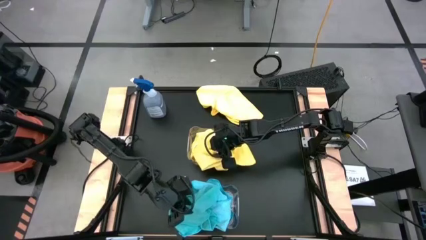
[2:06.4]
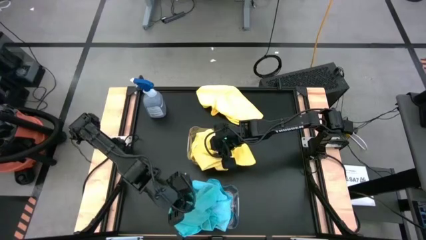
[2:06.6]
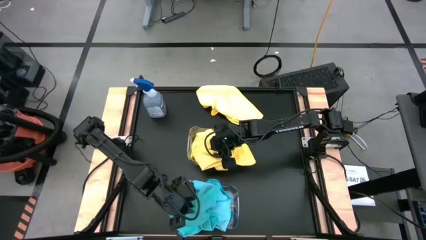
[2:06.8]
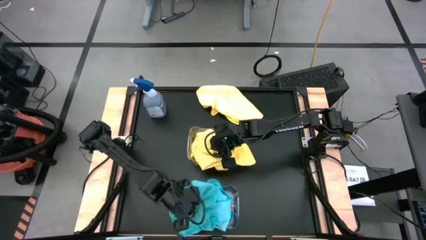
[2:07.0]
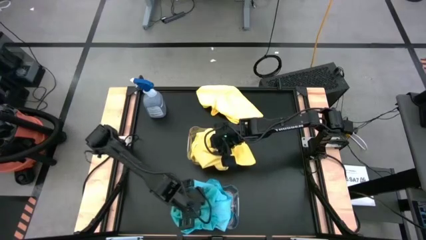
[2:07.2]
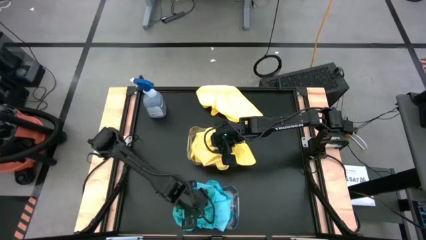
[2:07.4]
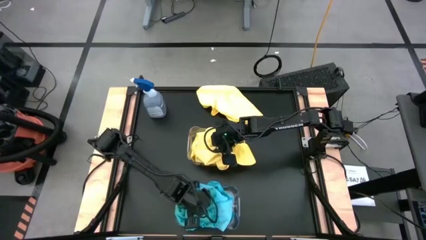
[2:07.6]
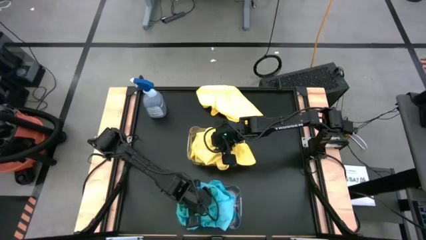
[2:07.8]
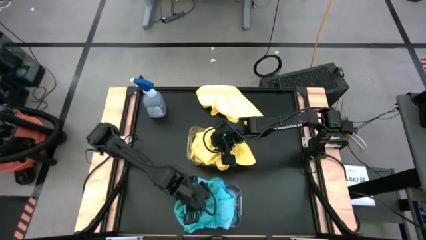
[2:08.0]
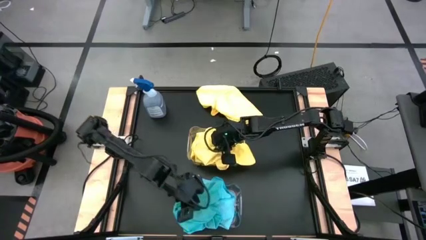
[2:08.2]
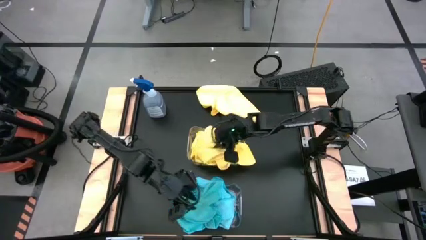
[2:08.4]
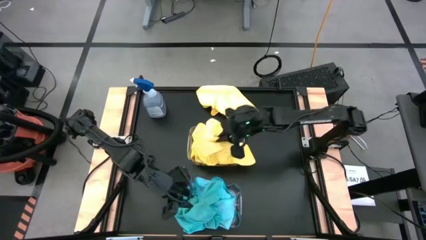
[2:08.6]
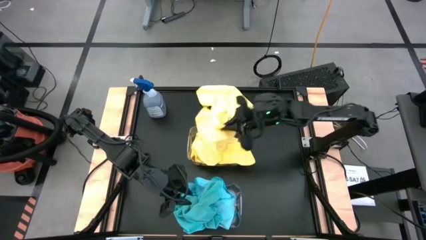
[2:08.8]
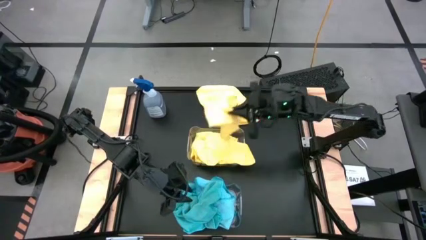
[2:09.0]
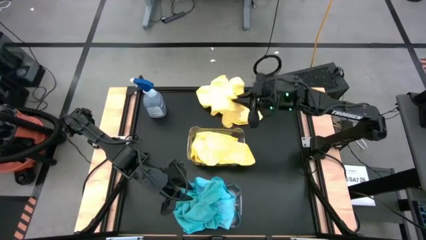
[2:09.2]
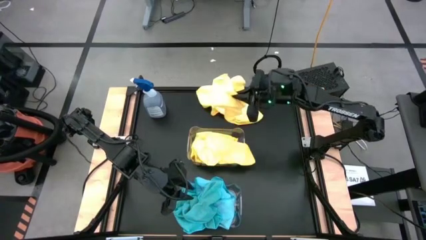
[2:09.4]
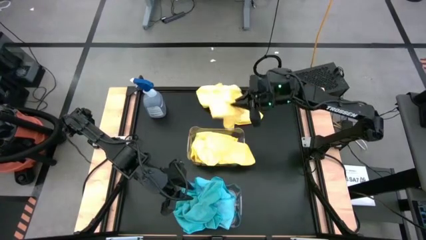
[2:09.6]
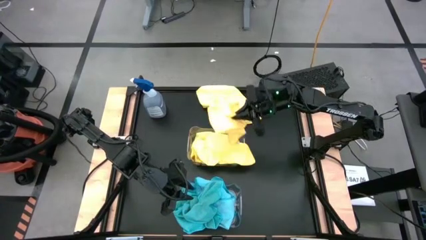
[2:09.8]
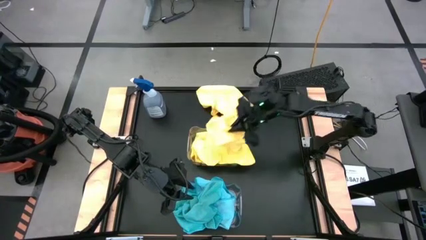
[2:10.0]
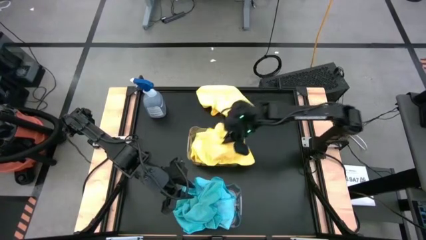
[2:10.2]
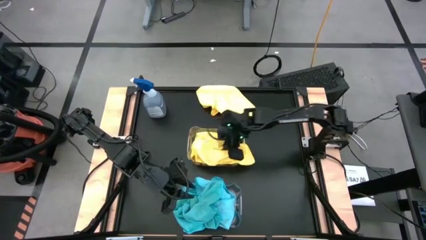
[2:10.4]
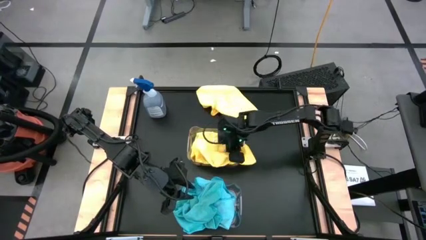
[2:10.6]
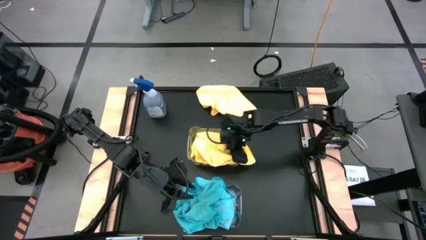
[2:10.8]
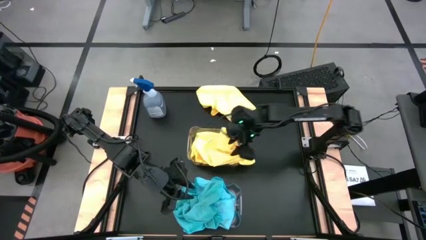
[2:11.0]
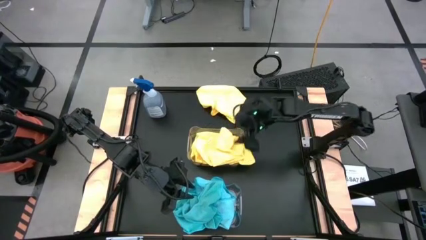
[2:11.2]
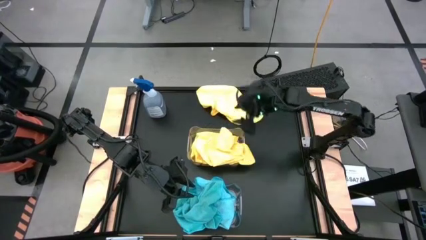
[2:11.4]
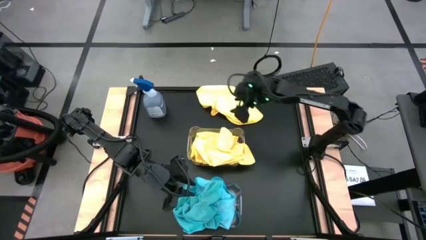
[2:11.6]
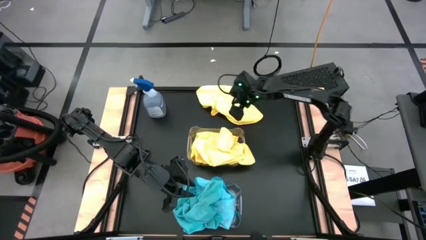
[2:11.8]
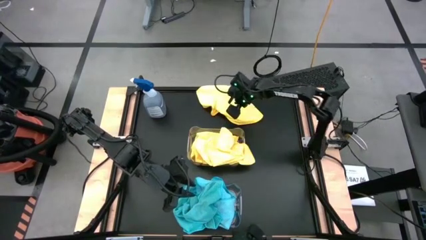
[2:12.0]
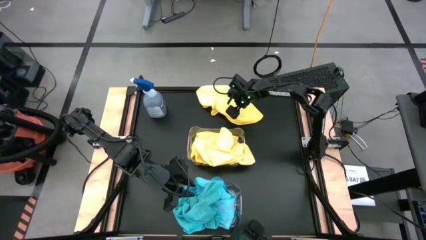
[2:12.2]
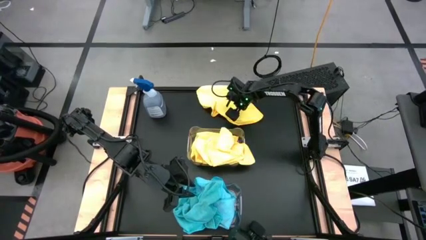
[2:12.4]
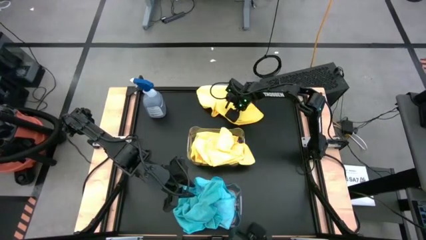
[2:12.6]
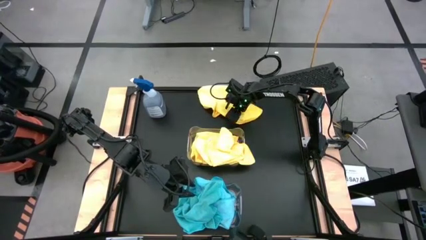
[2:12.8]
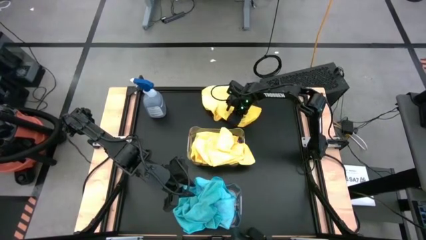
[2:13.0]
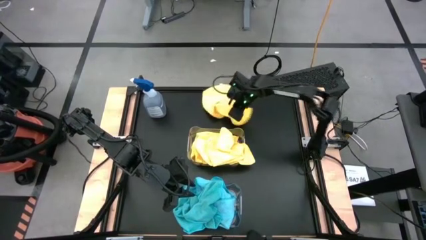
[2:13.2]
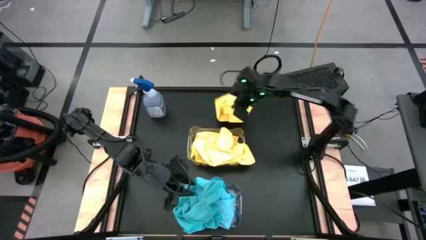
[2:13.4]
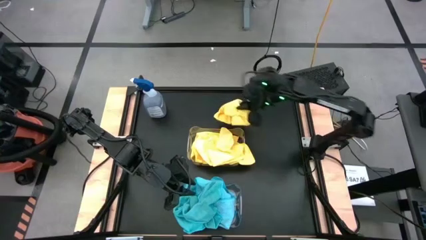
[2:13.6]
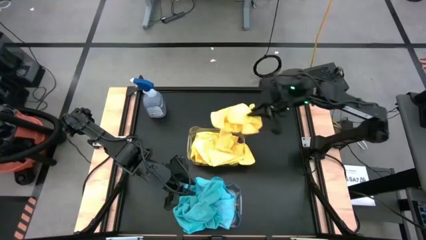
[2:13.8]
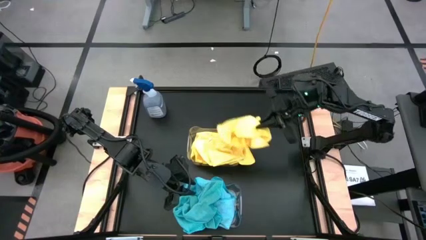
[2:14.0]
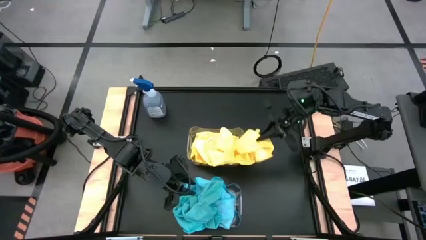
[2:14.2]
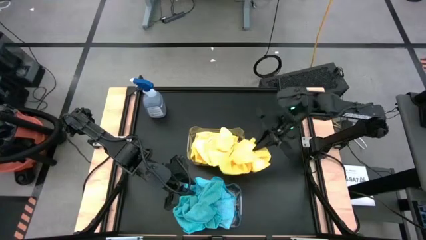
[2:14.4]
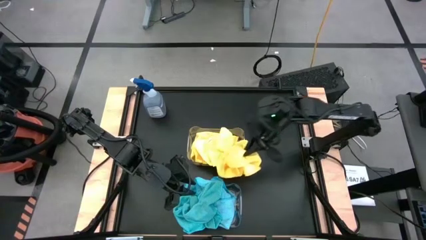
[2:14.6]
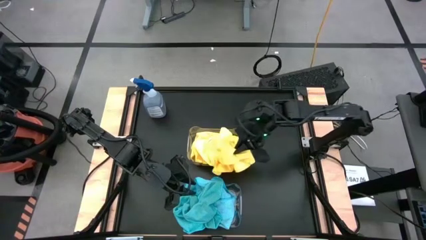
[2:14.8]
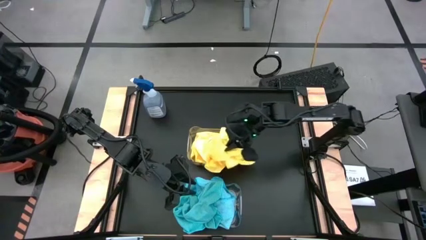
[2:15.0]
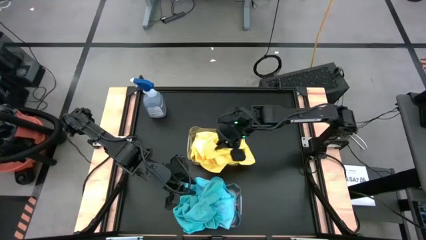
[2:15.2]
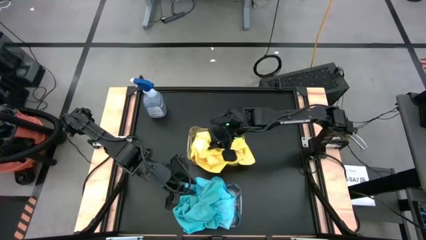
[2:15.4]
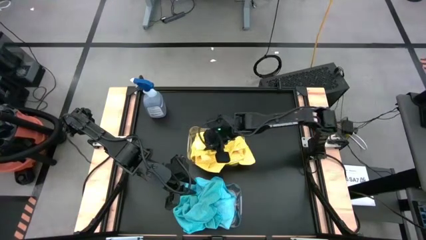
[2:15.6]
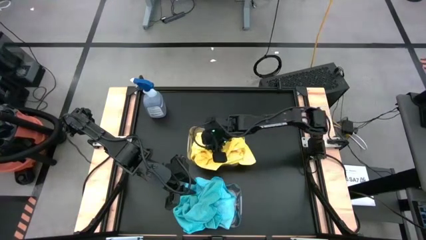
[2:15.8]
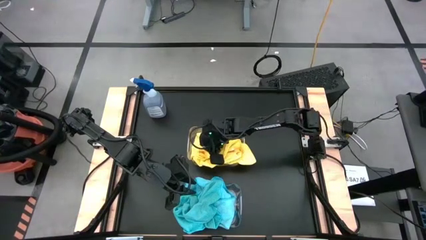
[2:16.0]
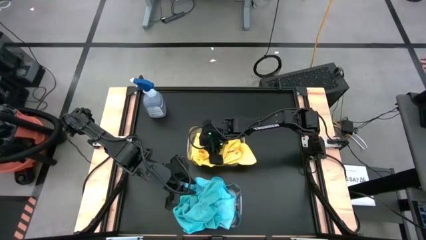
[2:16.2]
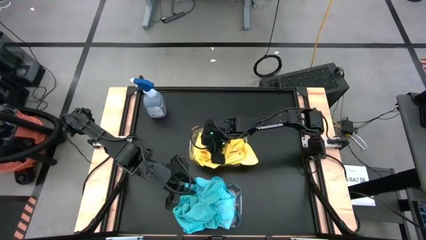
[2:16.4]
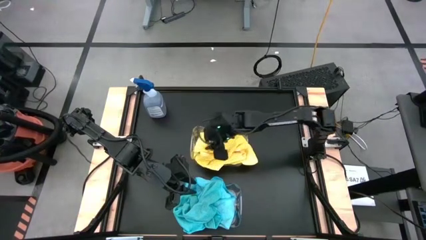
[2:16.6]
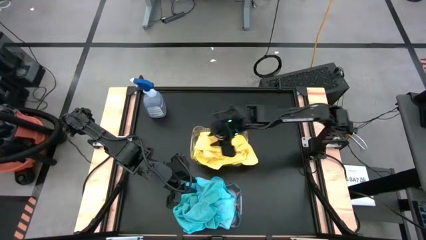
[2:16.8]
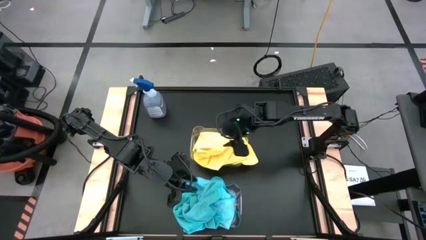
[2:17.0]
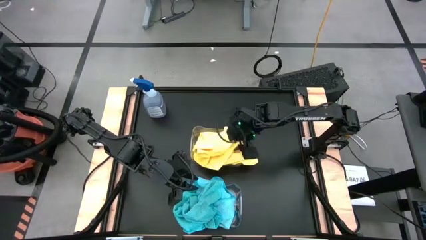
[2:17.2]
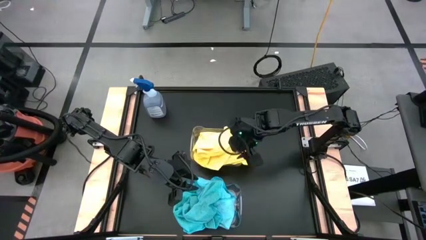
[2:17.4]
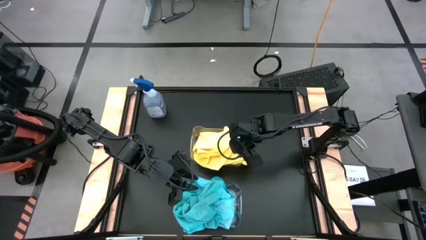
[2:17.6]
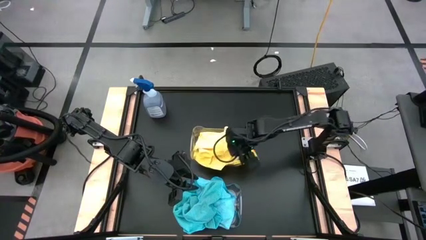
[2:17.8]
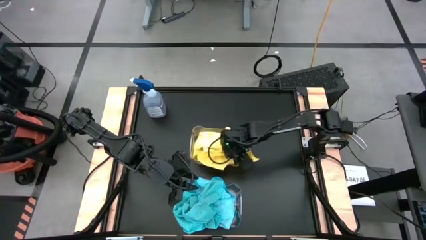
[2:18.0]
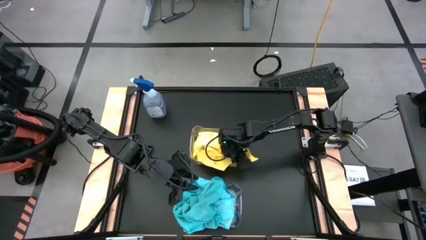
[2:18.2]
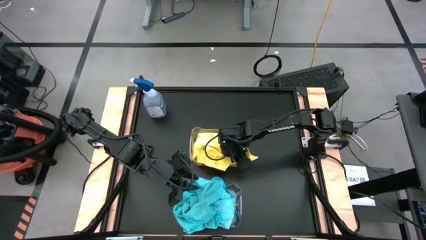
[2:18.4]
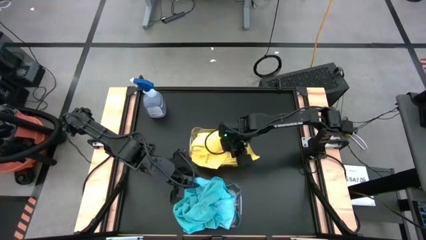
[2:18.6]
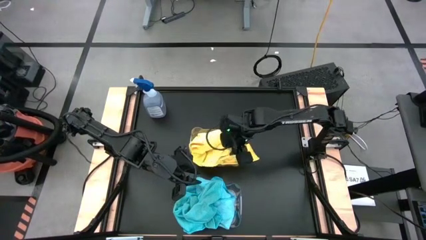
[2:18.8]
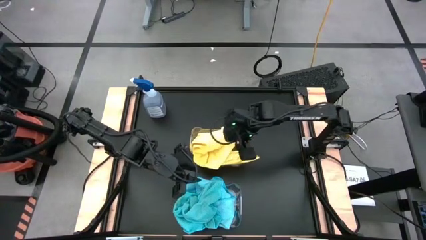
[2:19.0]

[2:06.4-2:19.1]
Task: Sort microfiber towel by color & place in baskets
Put the yellow microfiber cloth into the top transparent bin

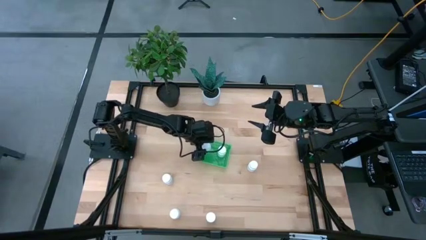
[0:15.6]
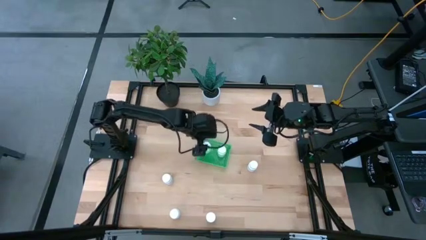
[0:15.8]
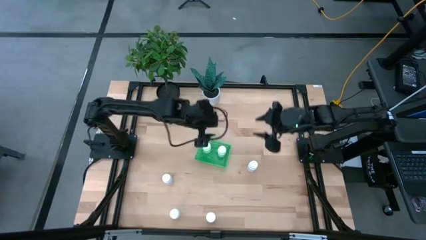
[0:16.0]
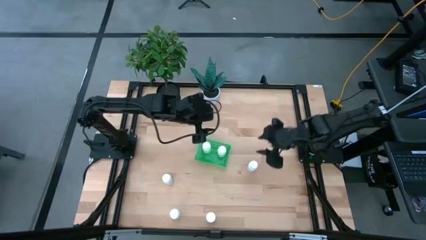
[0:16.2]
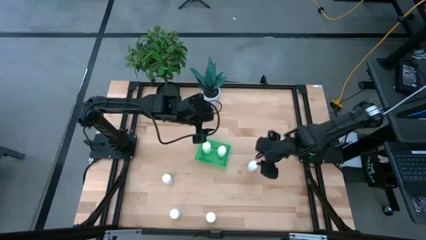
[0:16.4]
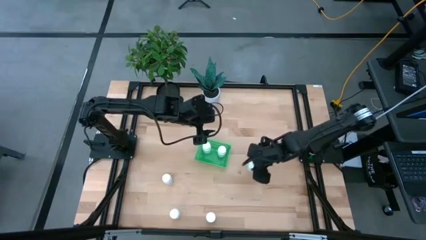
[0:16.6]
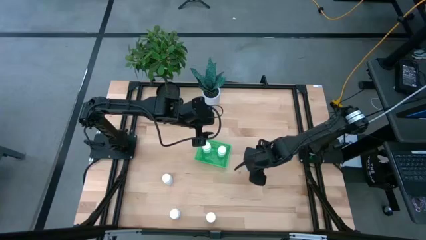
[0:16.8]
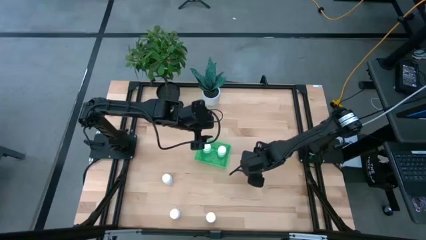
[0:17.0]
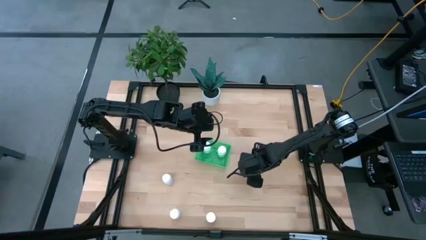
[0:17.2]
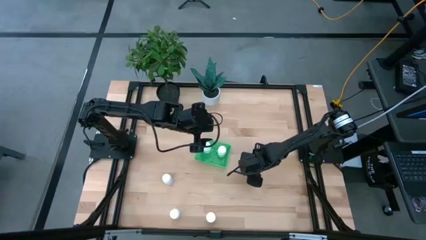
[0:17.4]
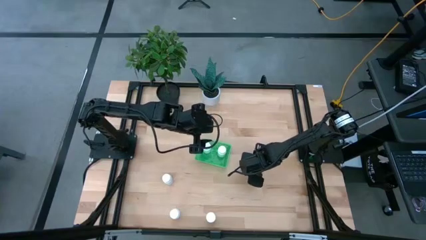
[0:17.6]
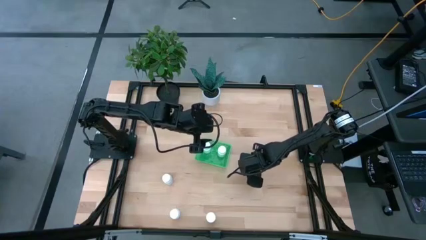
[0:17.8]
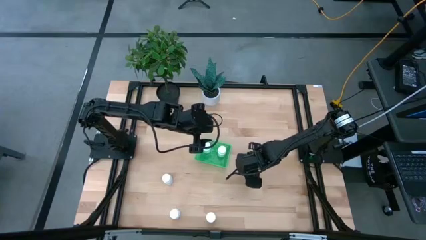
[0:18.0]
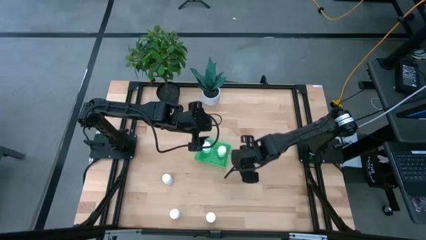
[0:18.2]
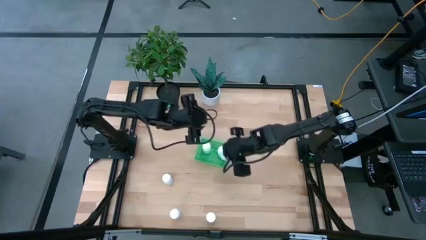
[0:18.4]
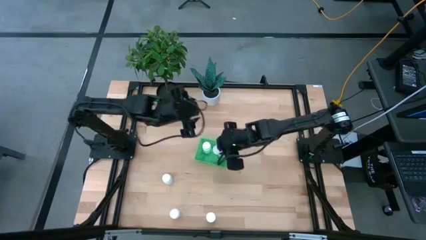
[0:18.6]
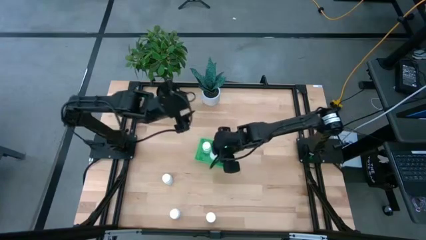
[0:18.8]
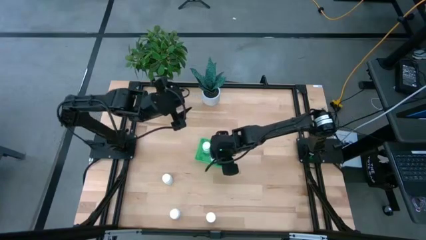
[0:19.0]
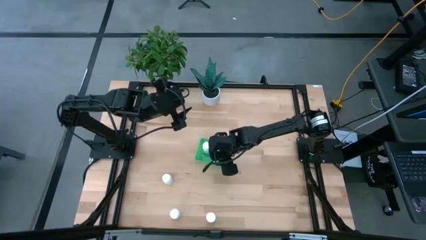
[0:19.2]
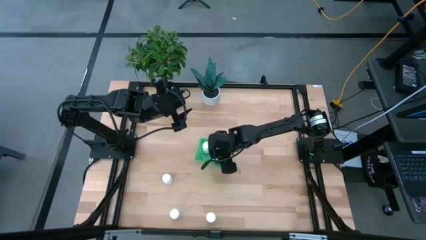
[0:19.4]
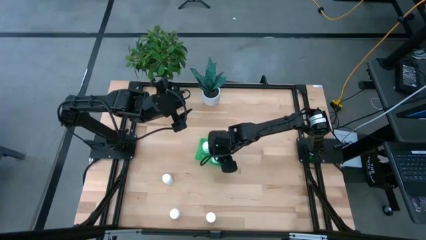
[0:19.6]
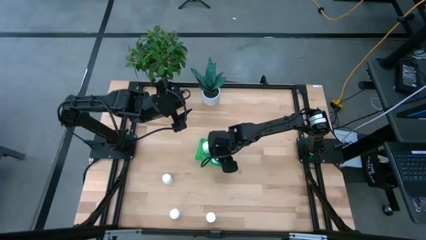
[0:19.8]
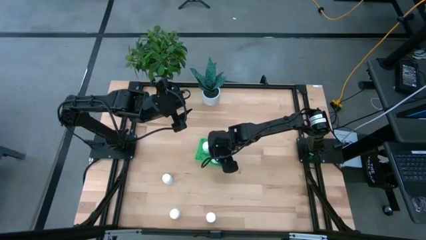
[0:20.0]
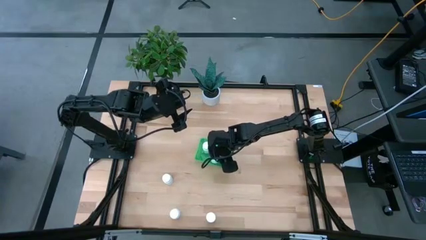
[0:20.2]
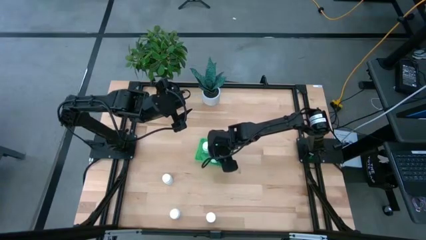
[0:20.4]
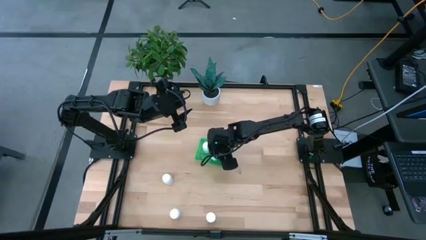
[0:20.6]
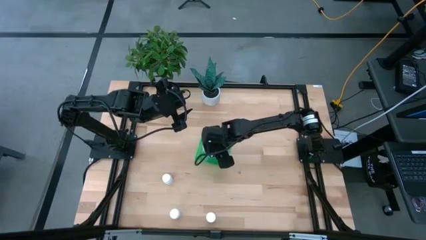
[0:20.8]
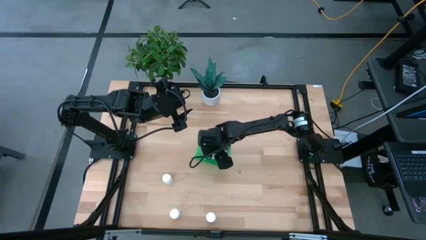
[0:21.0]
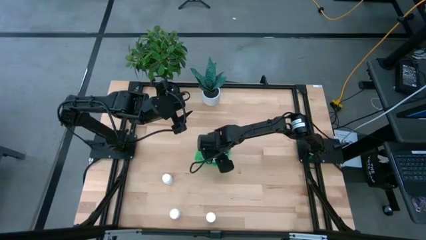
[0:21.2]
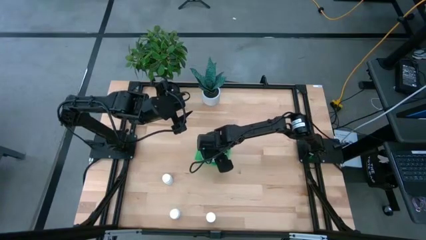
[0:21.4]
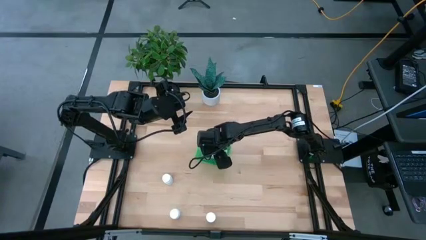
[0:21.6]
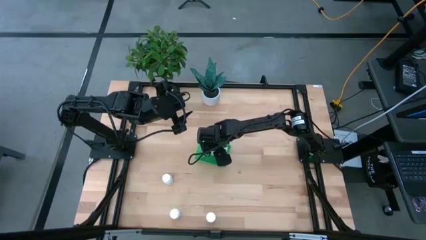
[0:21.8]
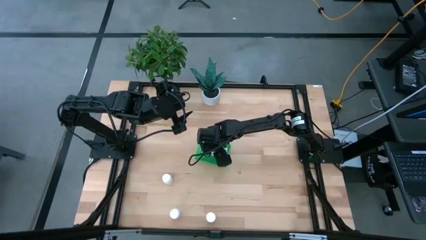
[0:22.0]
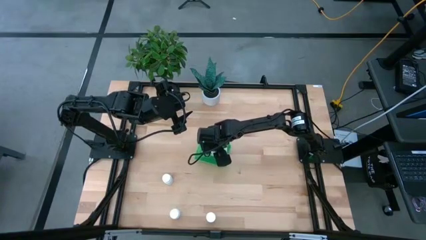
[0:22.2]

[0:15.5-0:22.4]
Task: Pick and place pill bottles into a basket
Put the pill bottle into the bin
